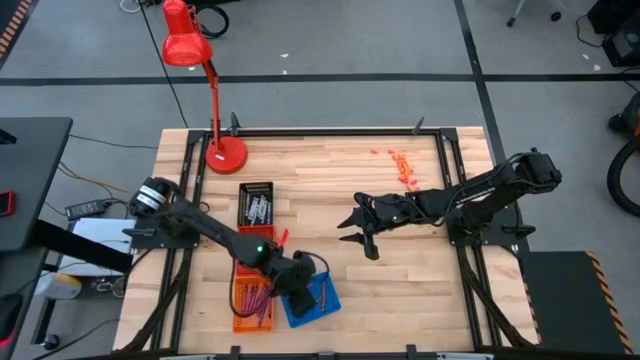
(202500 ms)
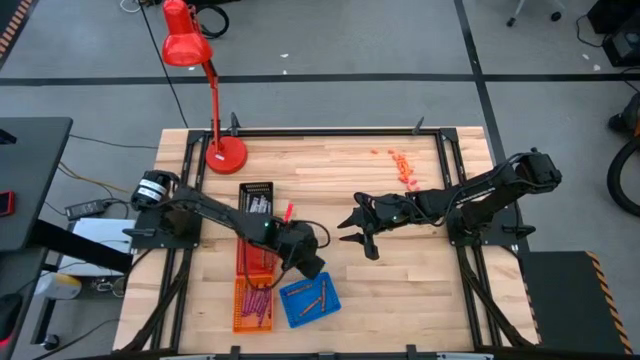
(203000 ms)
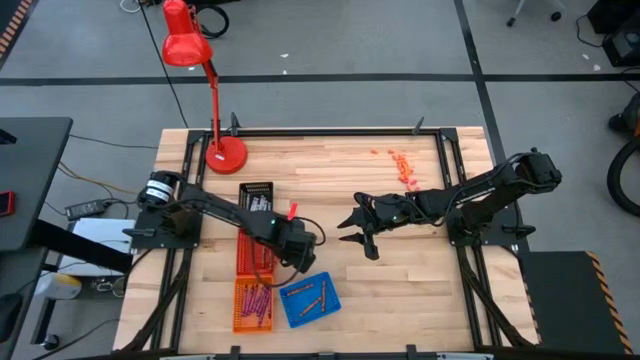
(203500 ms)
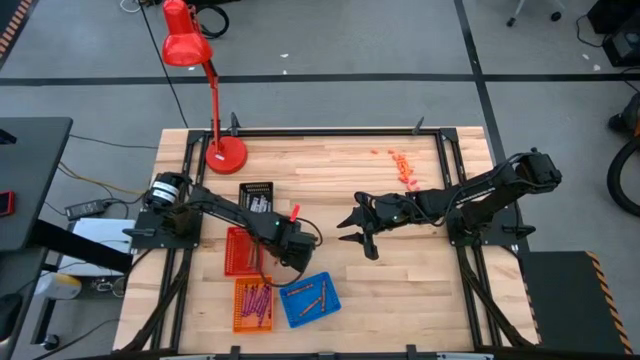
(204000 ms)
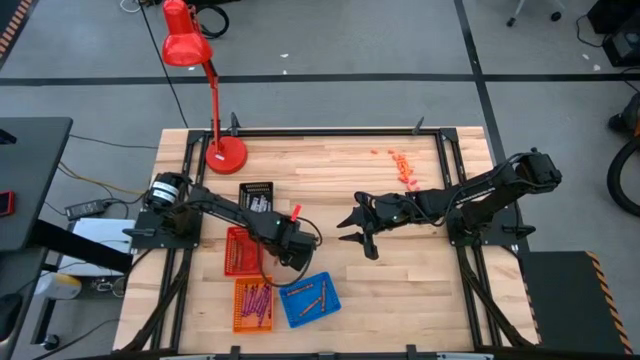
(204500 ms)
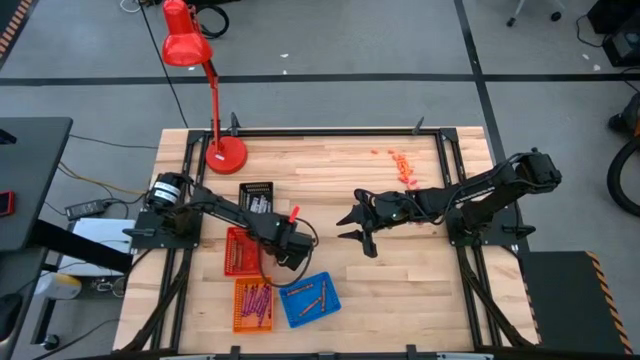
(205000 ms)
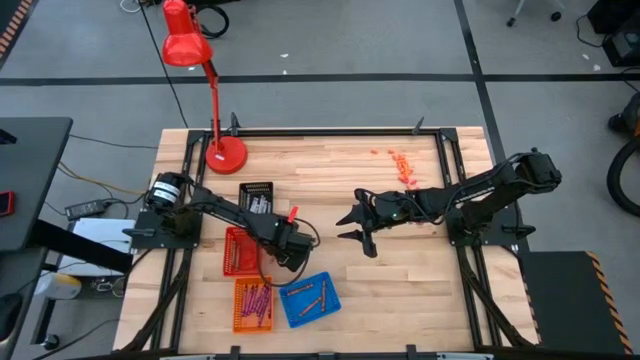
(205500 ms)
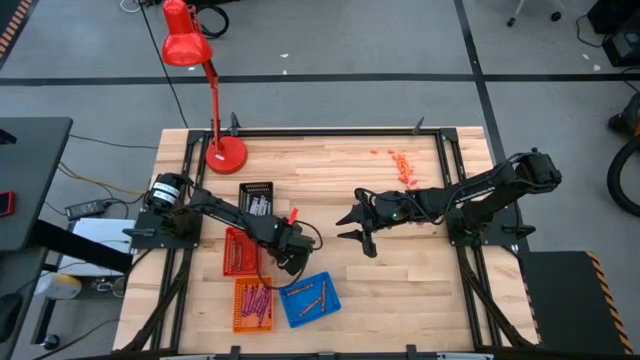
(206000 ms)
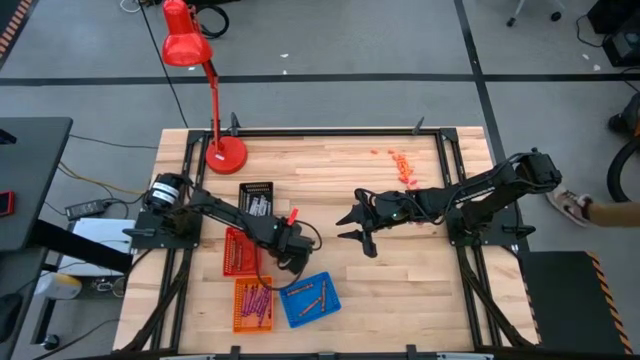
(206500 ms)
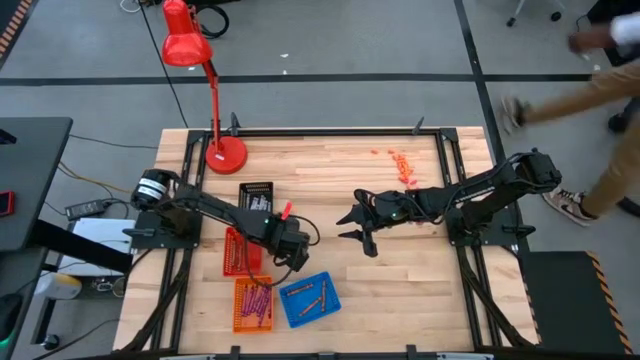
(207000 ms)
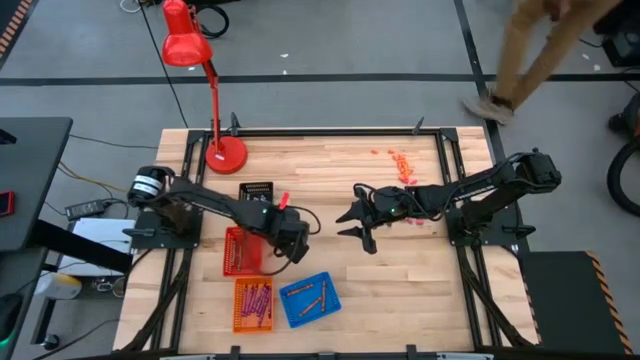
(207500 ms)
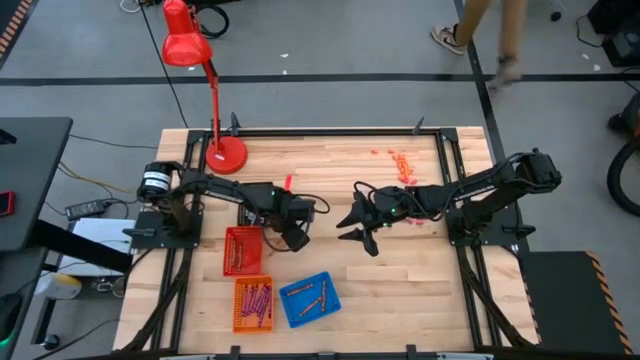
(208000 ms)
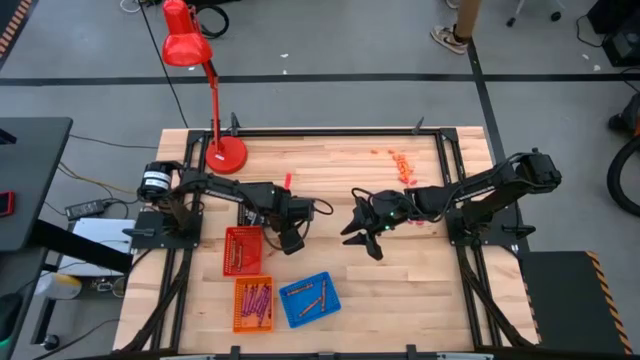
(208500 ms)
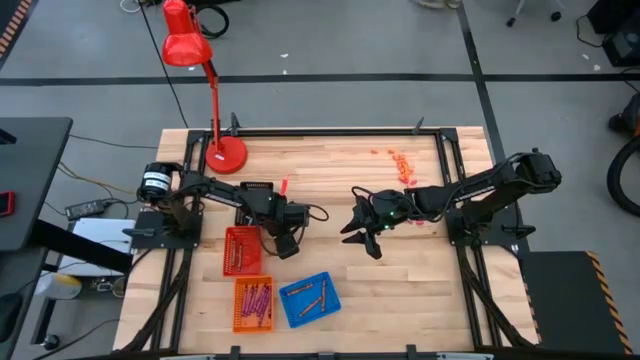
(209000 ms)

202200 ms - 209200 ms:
Task: Sort crayons
Put the orange crayon into the blue bin

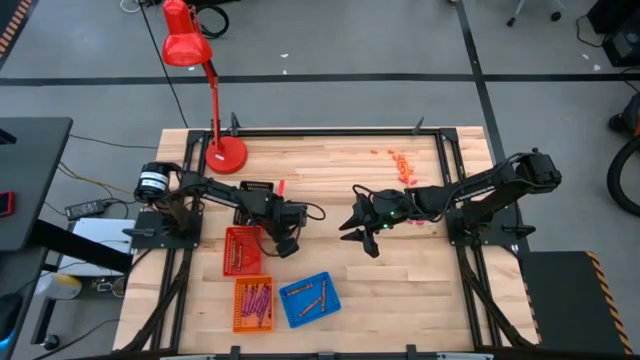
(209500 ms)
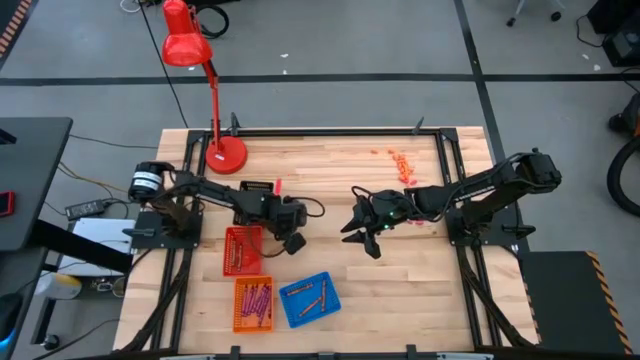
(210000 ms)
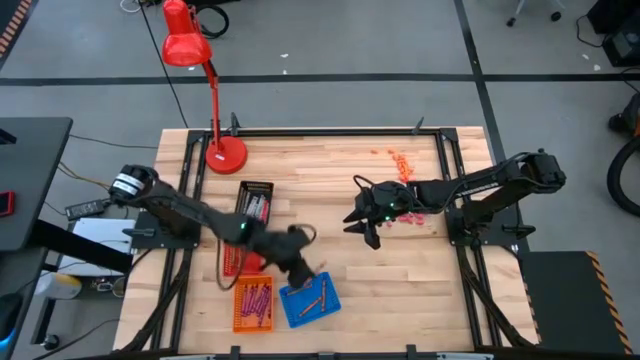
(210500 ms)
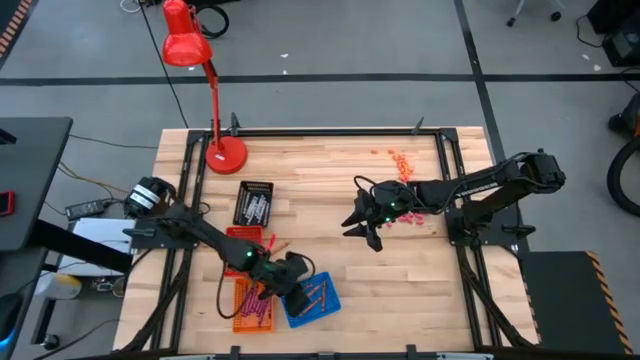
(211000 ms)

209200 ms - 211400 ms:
Put the orange crayon into the blue bin

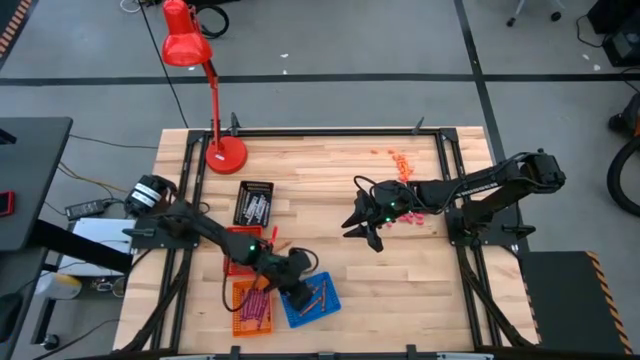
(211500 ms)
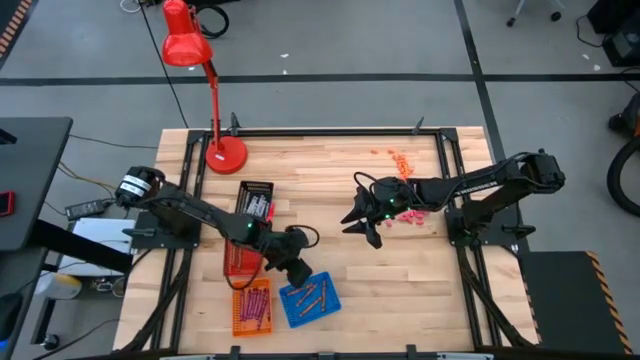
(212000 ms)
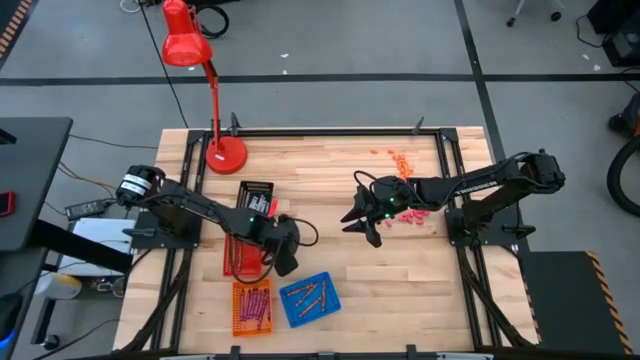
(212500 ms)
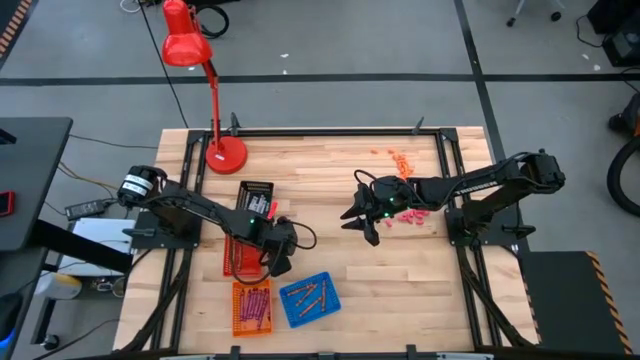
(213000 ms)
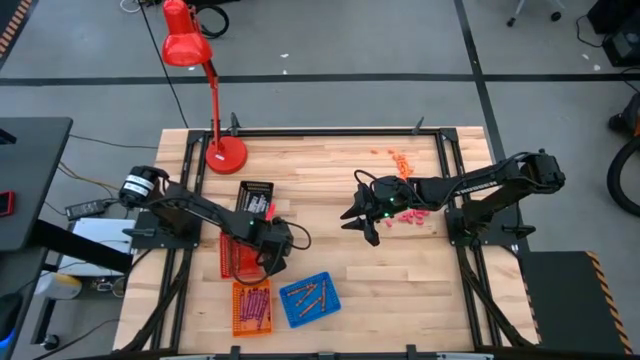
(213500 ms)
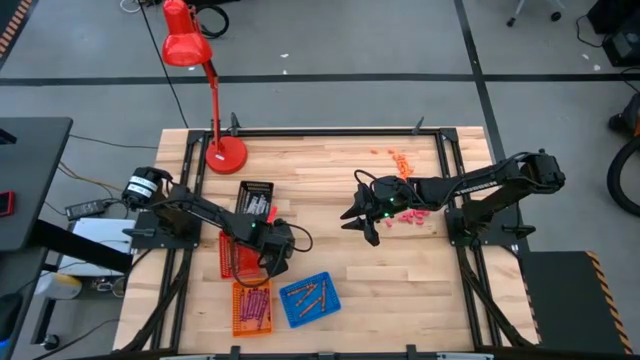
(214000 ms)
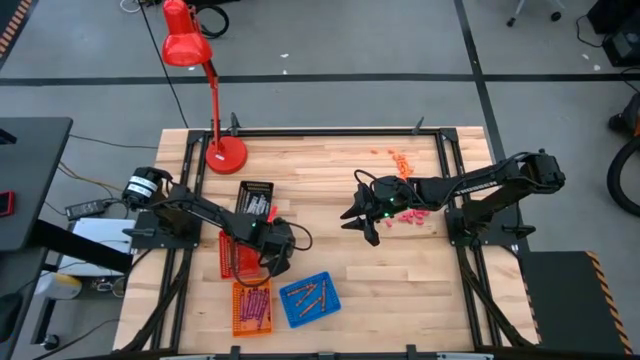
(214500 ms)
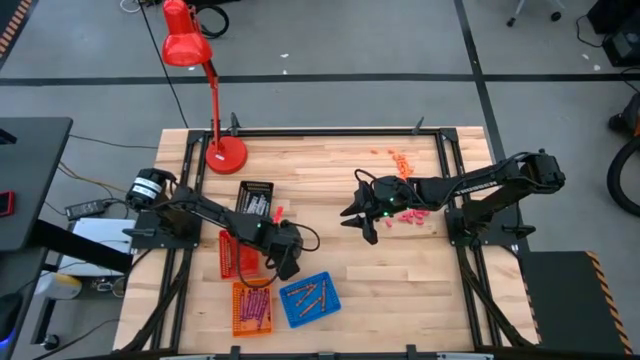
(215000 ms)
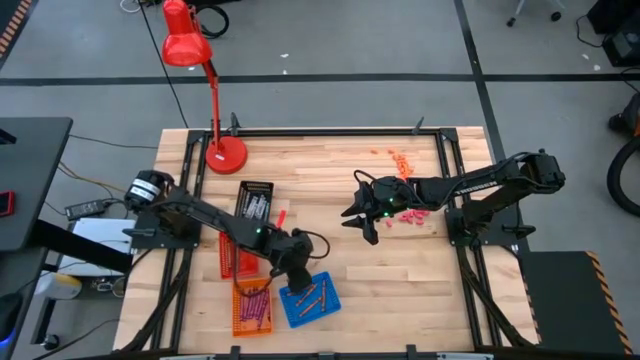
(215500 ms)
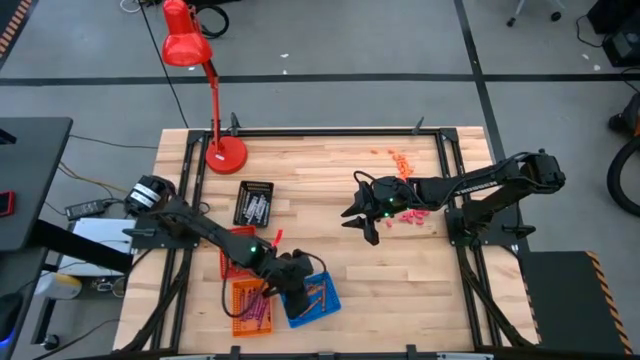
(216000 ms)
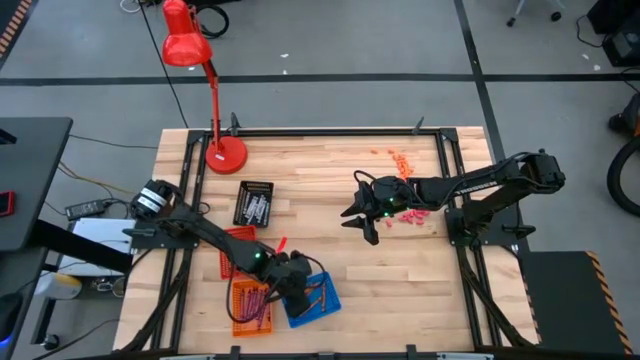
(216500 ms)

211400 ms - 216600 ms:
Put the orange crayon into the blue bin

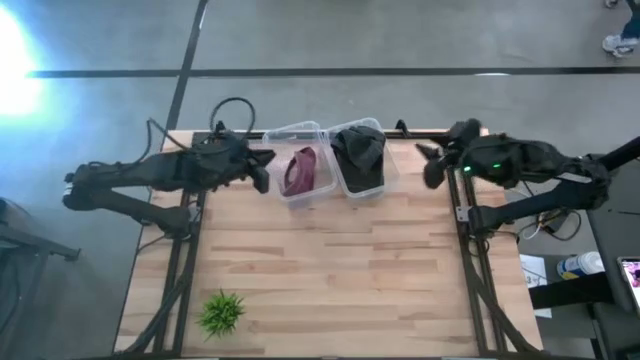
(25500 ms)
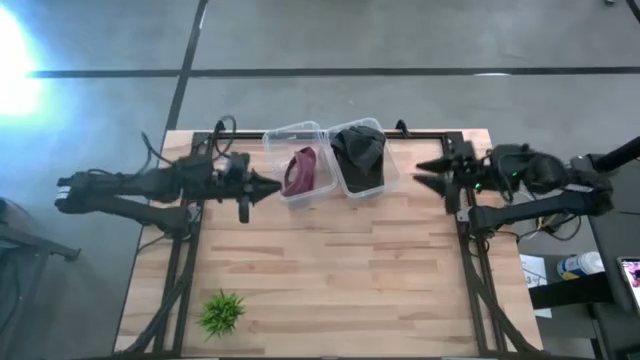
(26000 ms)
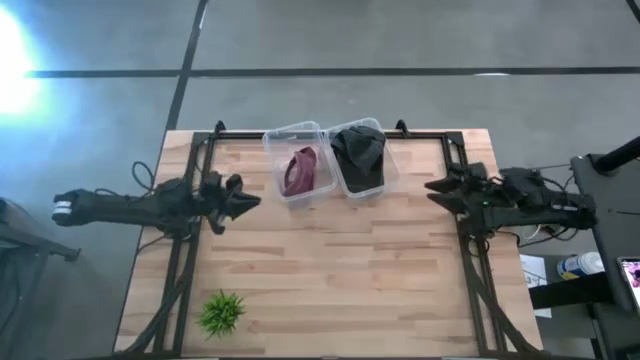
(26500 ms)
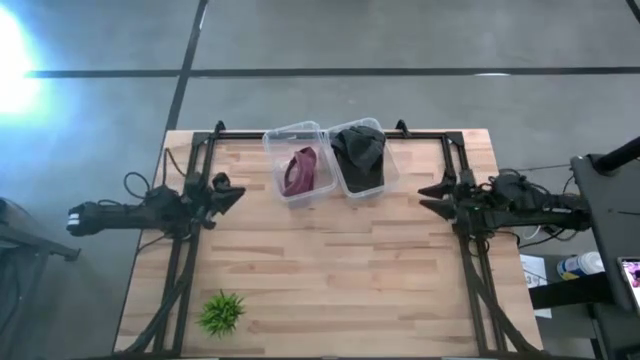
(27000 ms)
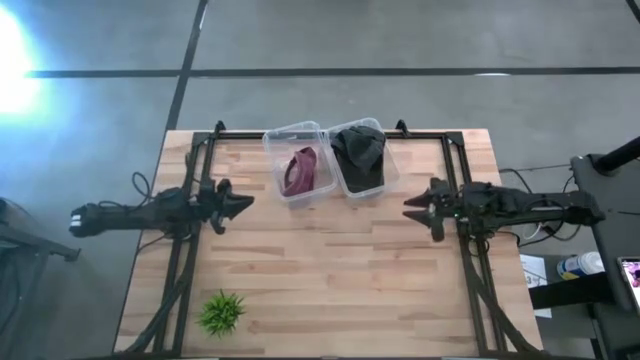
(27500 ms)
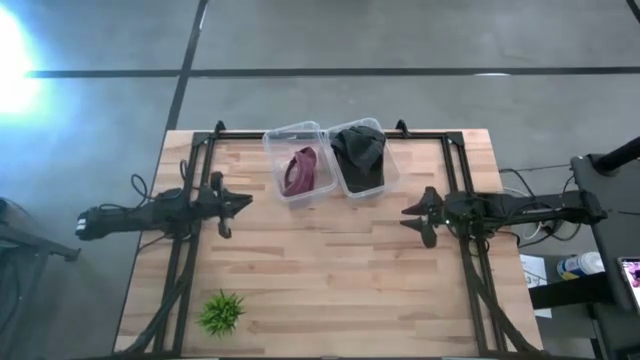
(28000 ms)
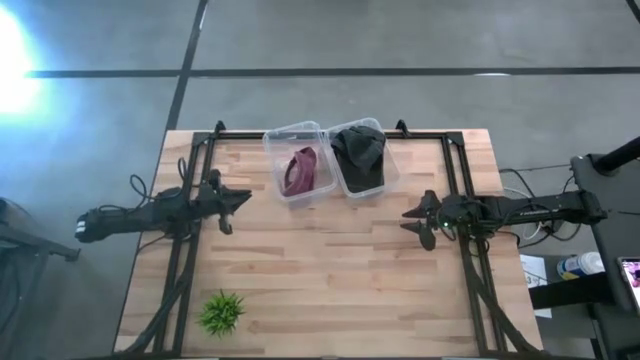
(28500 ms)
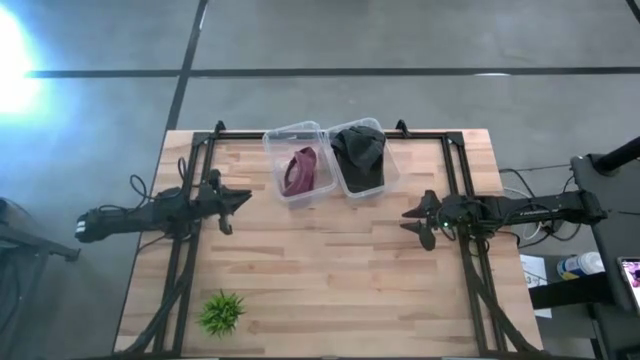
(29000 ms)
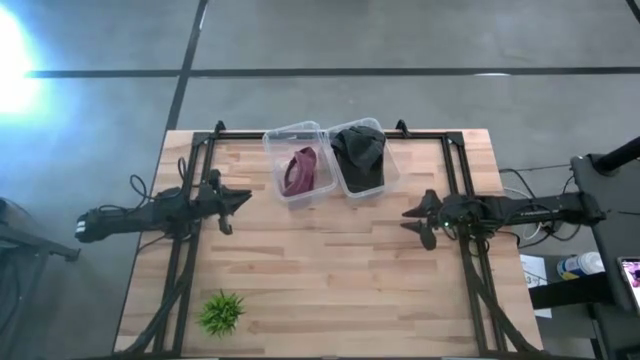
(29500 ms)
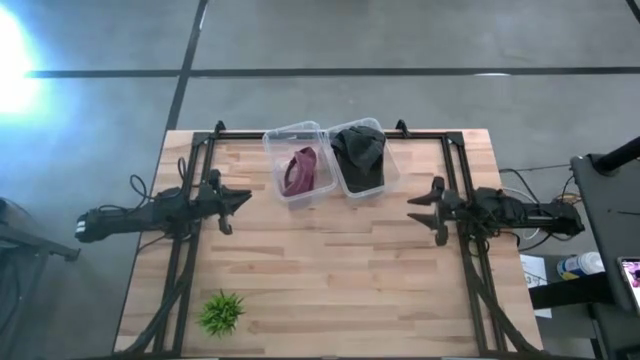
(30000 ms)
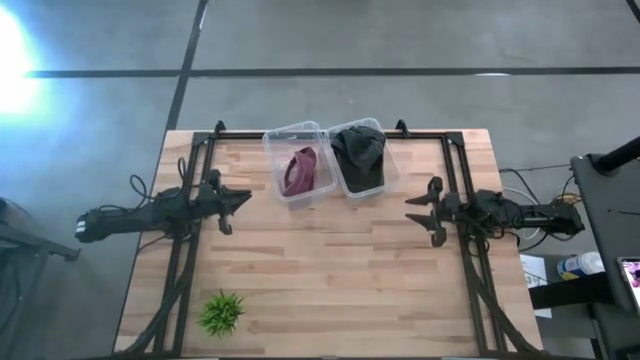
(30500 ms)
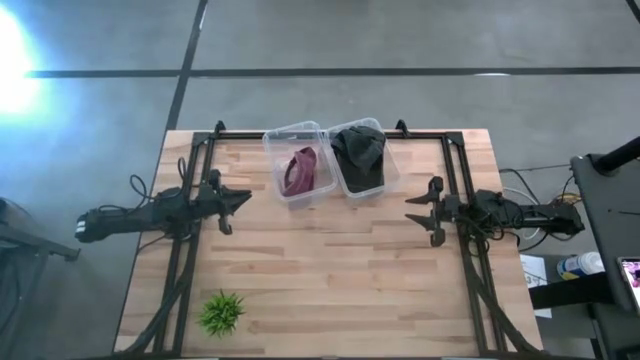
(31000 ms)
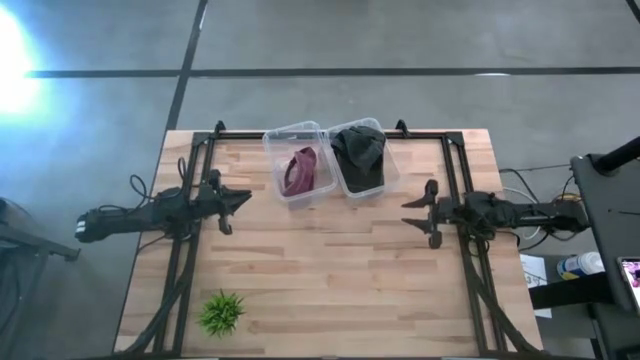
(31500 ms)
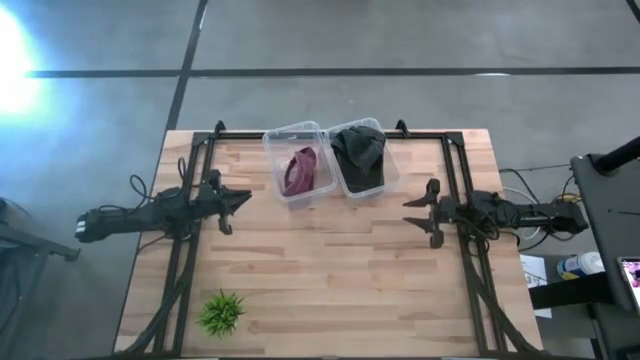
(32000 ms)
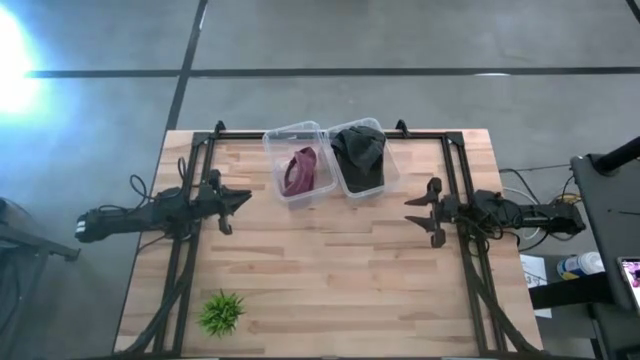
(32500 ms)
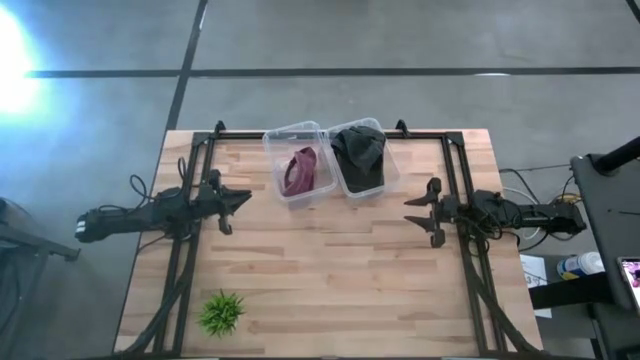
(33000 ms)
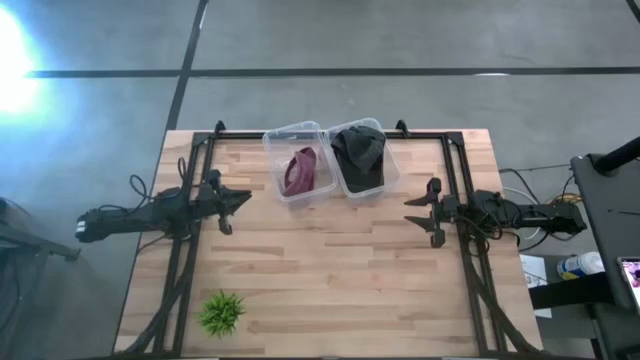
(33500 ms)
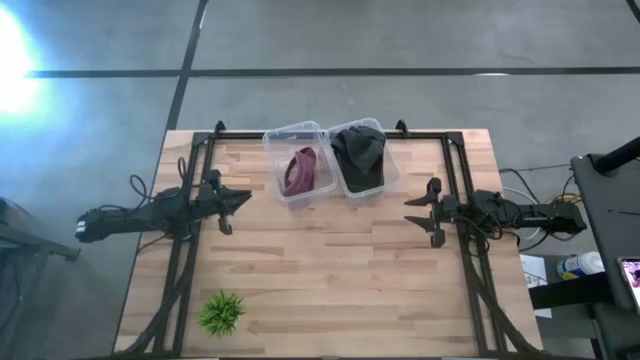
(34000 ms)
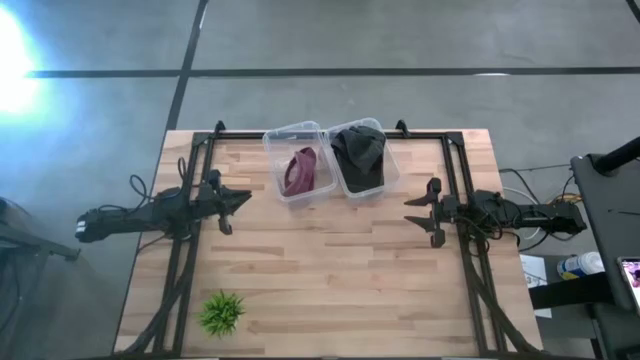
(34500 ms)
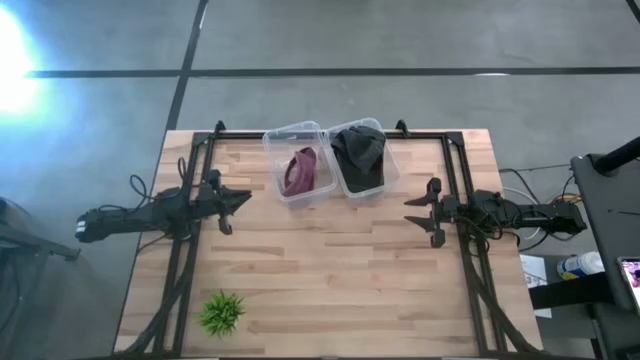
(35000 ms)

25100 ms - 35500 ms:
Task: Pick and place caps into container
Return to Home Position
